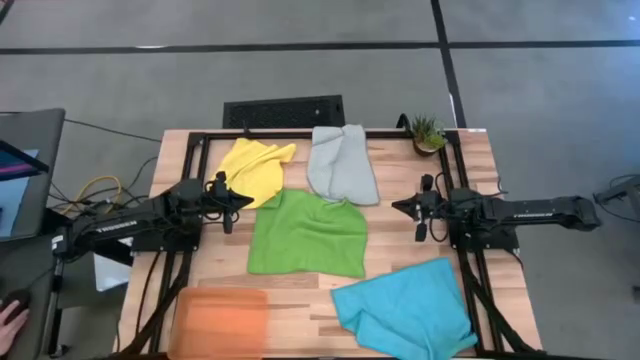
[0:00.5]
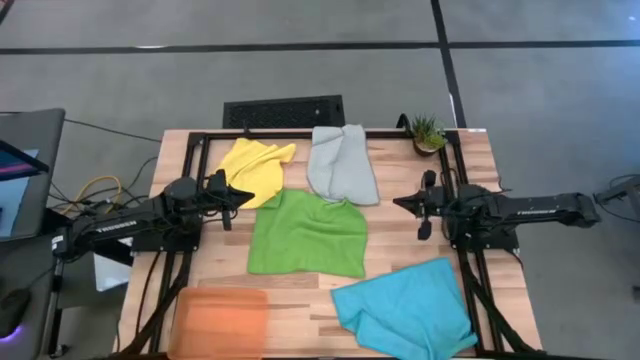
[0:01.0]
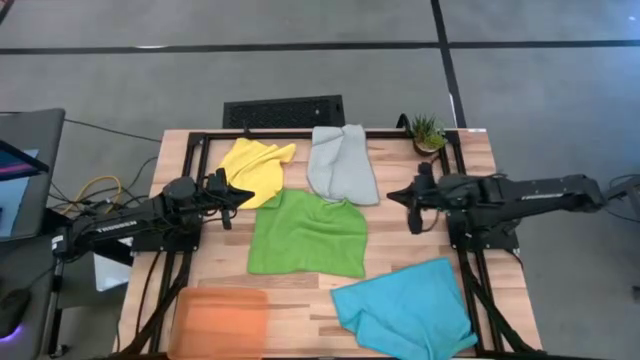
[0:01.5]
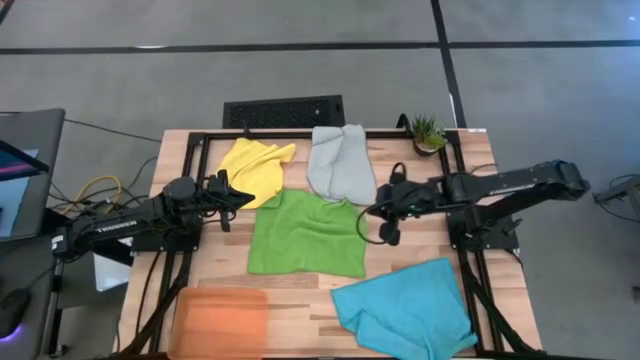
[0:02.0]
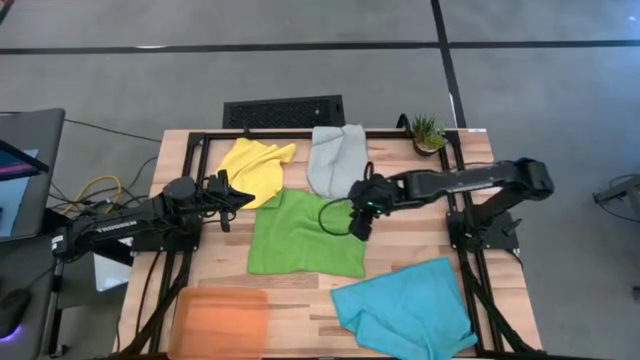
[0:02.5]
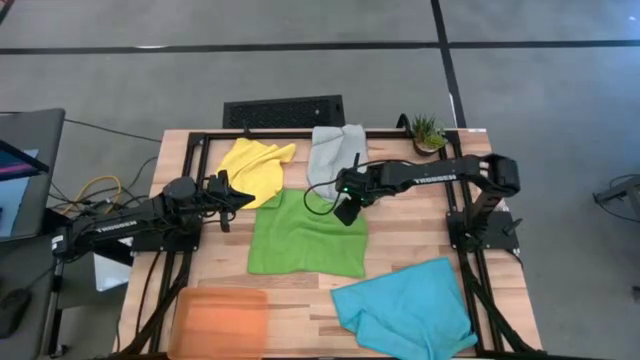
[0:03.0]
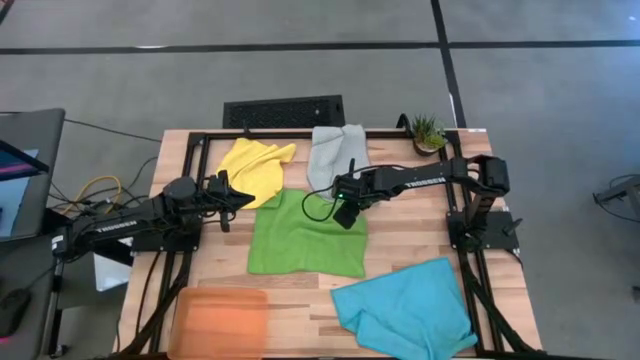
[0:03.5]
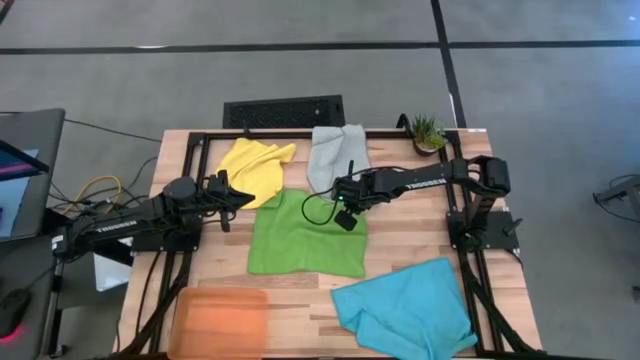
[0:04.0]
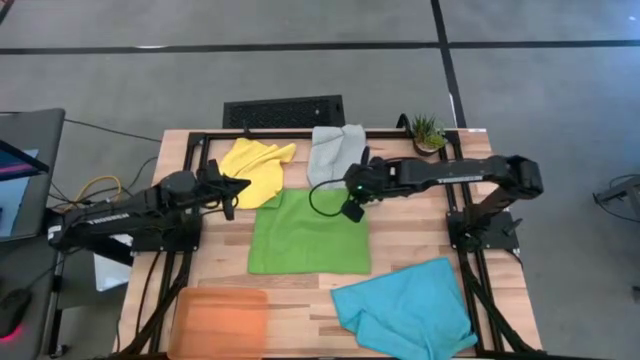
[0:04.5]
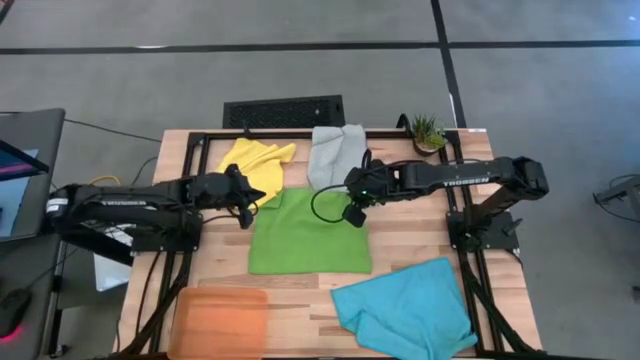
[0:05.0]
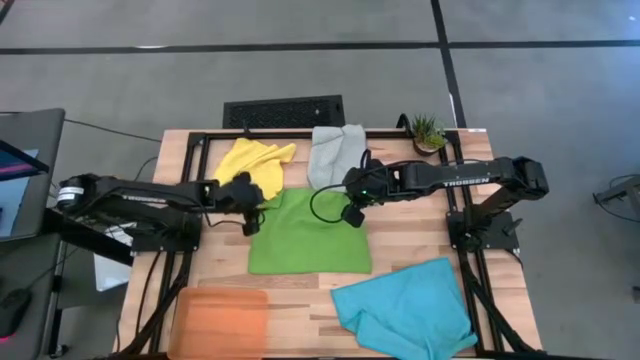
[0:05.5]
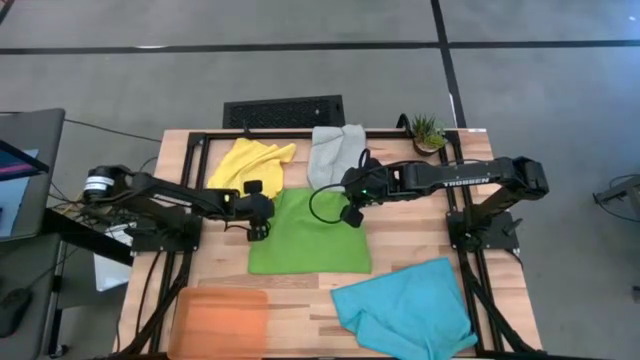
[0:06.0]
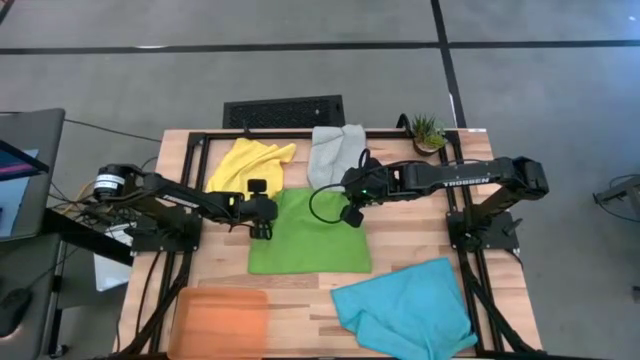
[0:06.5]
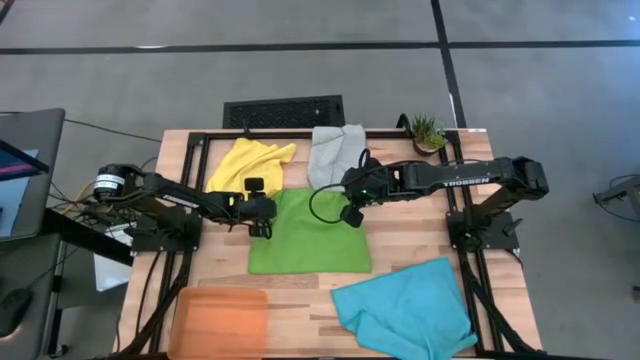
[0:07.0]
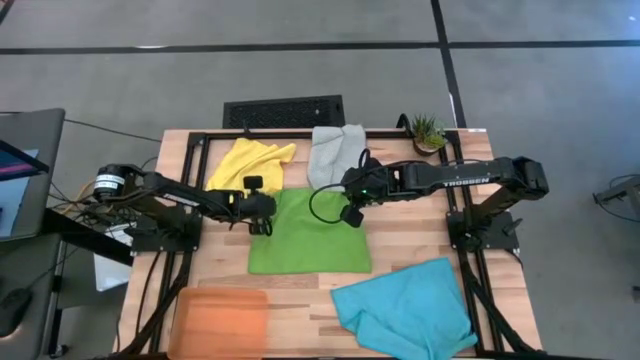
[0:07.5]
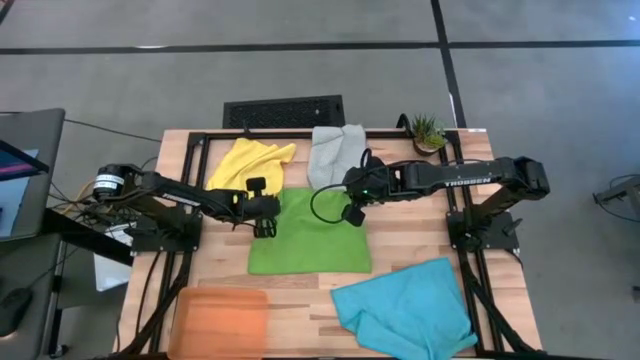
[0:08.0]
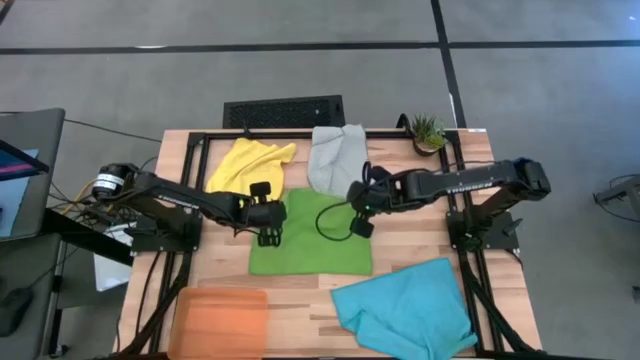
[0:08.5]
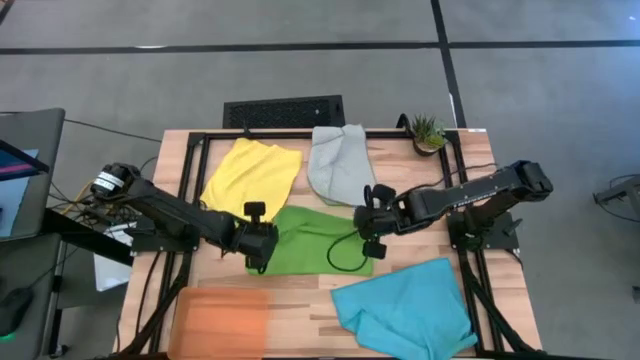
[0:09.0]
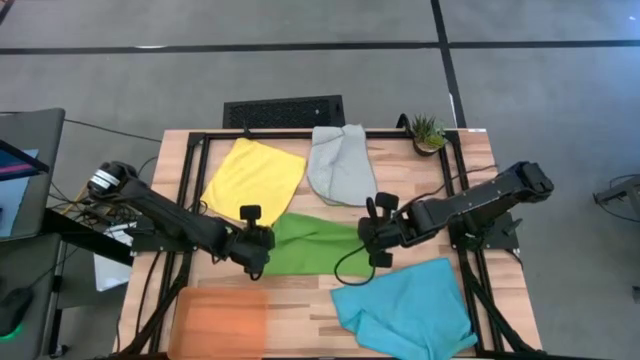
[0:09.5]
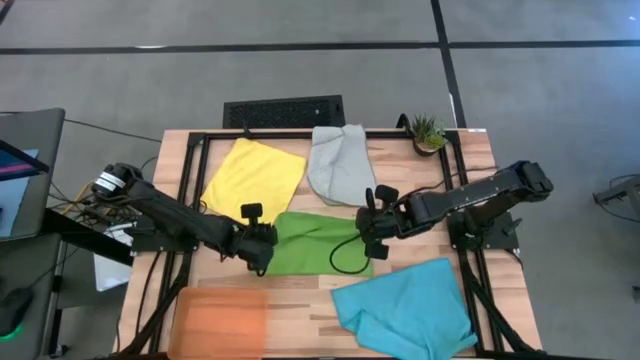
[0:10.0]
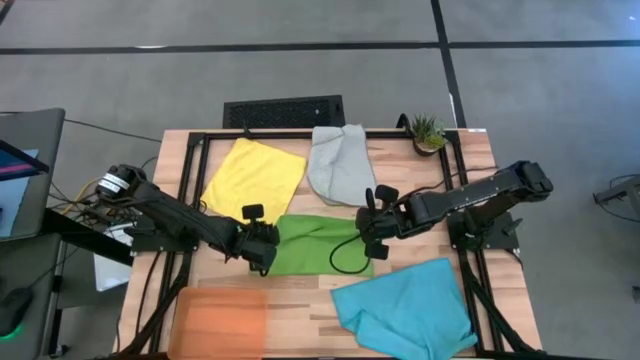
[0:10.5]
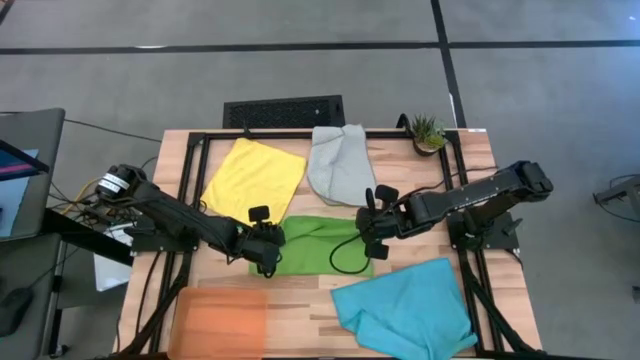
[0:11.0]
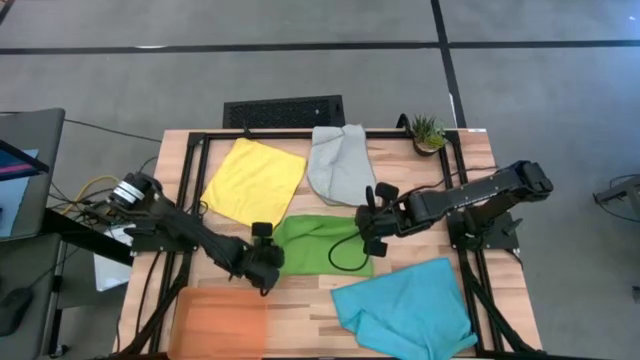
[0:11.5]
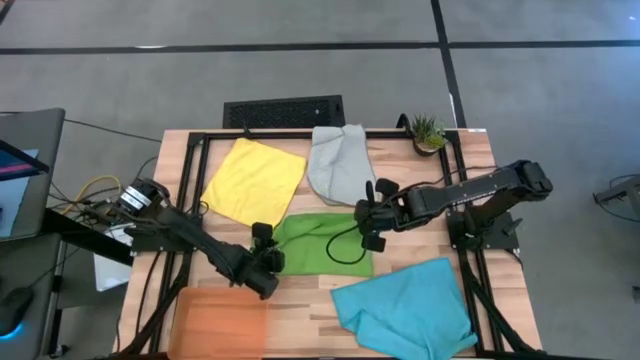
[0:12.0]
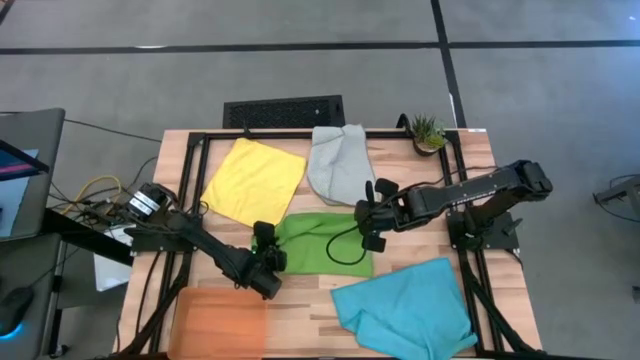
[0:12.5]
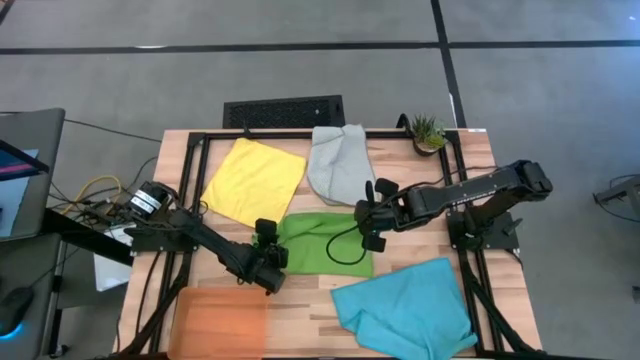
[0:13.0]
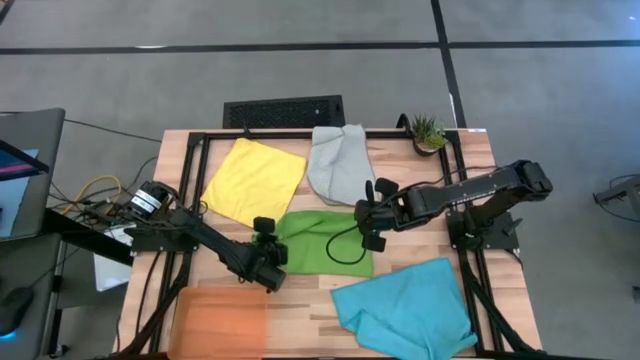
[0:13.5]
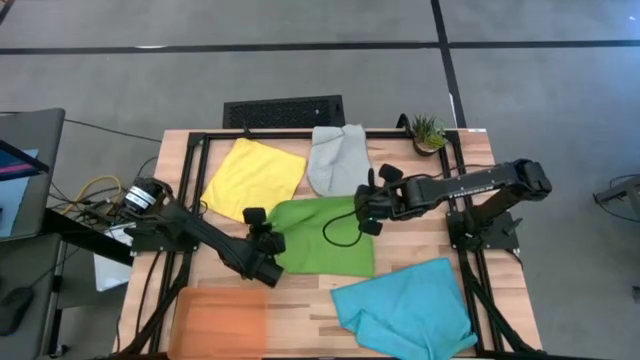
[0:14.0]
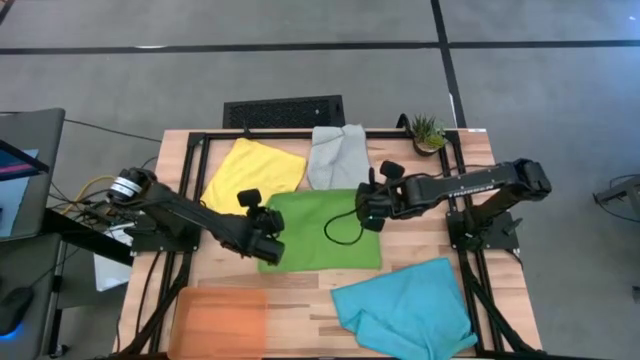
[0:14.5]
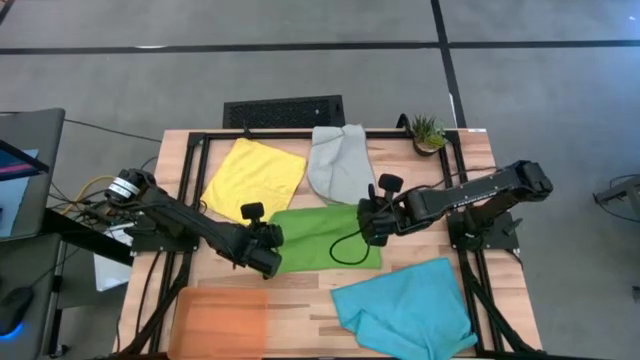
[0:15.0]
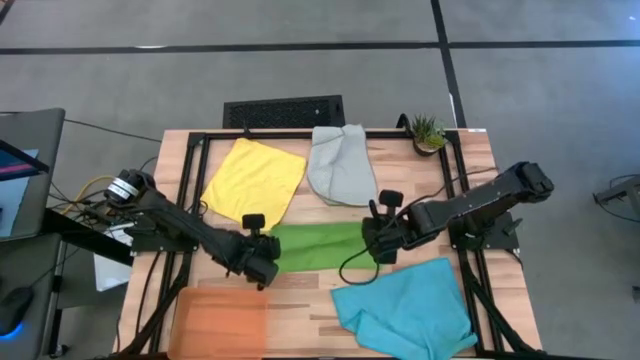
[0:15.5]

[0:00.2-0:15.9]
Task: Fold microfiber towels
Fold the green towel
